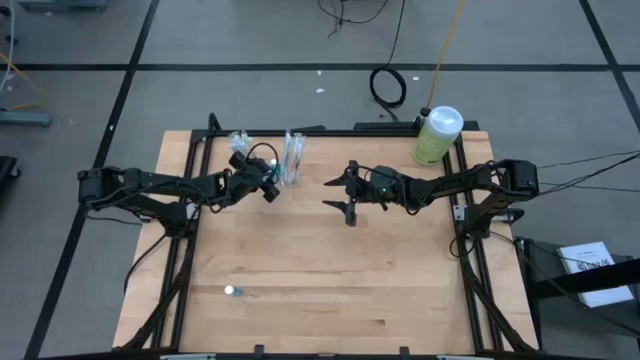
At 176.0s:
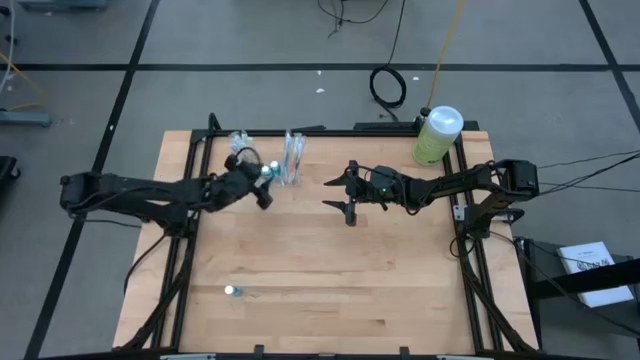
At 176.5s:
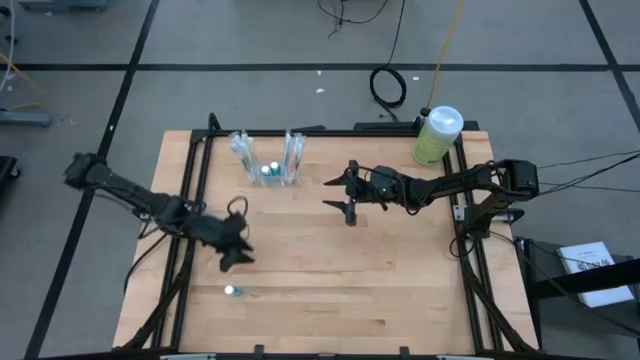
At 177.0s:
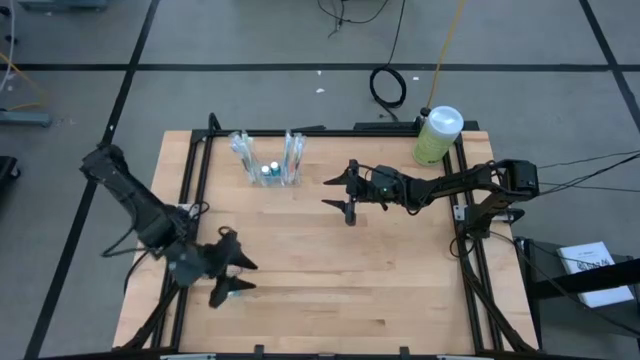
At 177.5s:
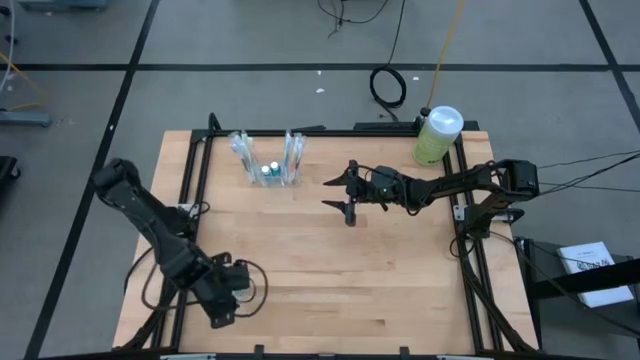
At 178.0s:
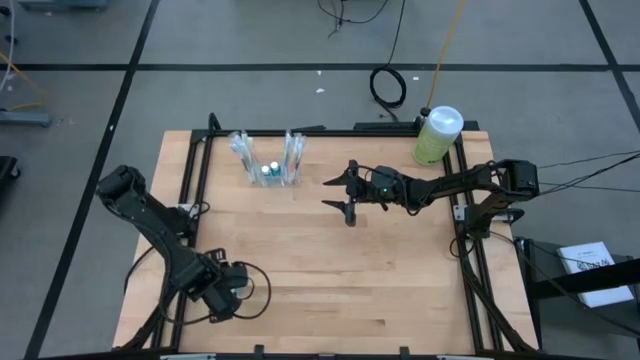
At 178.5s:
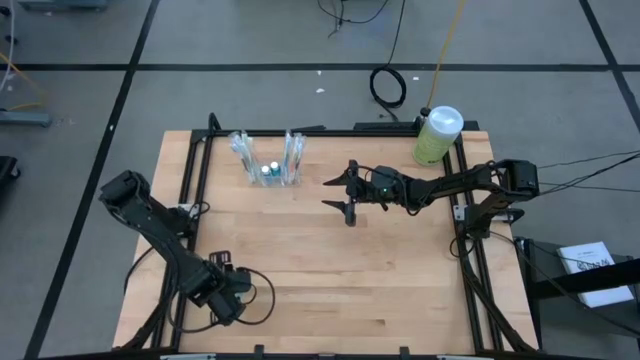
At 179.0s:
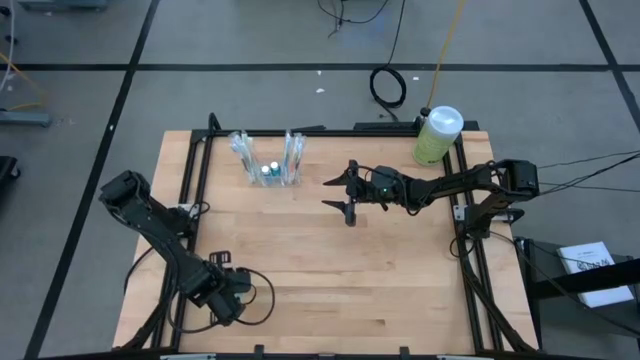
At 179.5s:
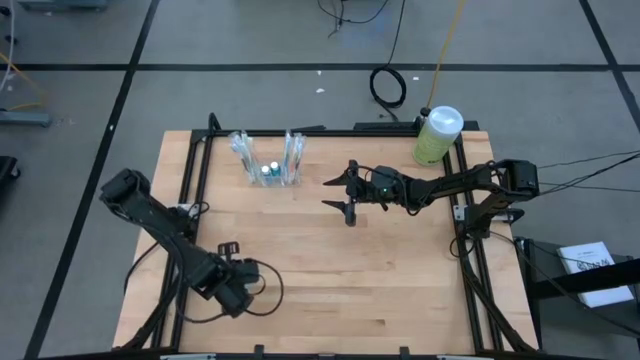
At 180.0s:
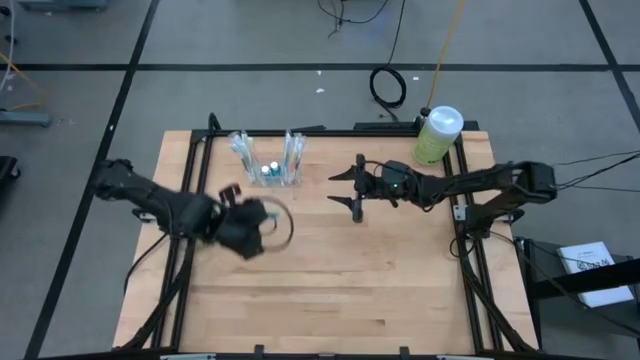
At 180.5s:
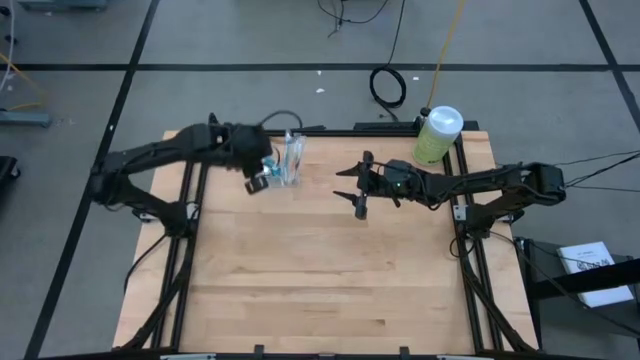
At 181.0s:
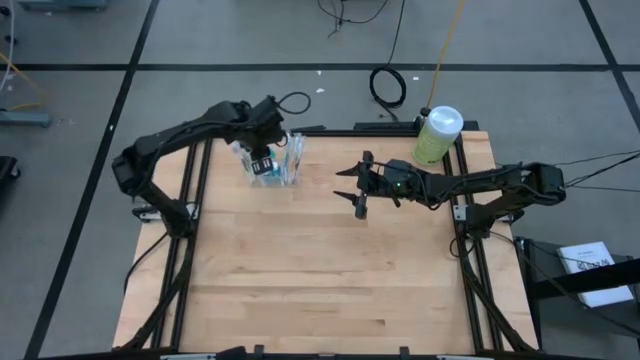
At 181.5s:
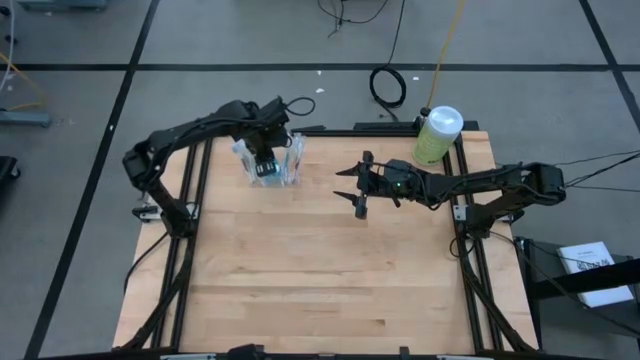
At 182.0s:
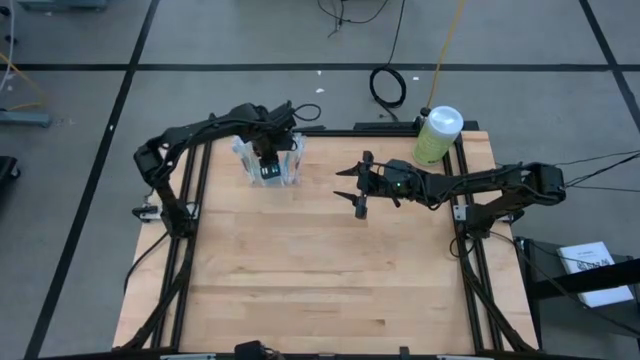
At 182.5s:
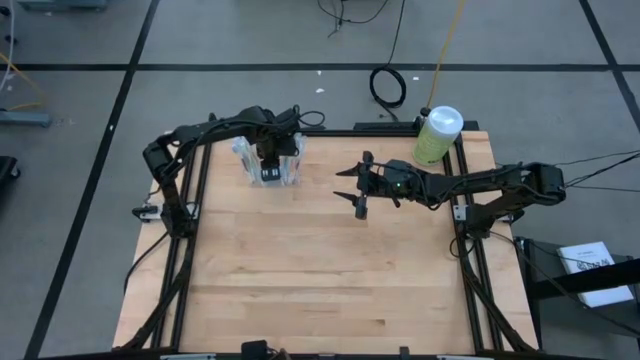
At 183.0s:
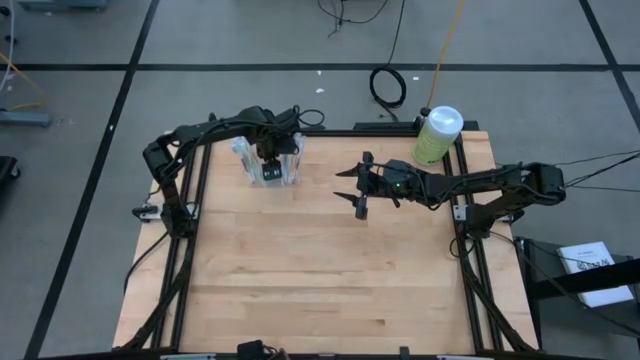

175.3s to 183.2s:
Task: Pick & Place toothbrushing station
Put the blue mouthwash into the transparent organizer

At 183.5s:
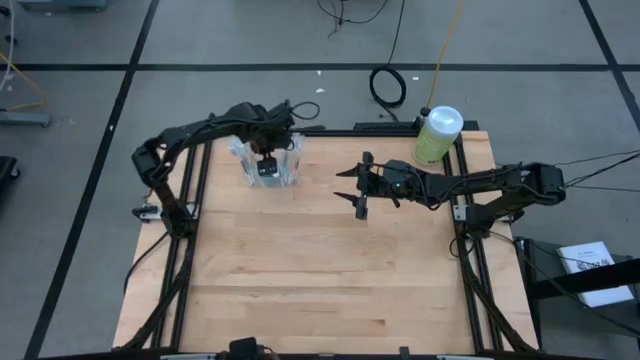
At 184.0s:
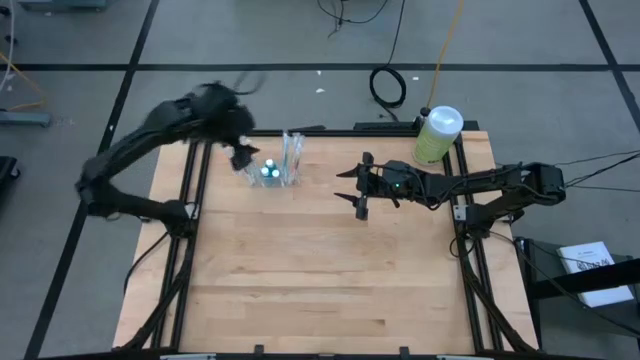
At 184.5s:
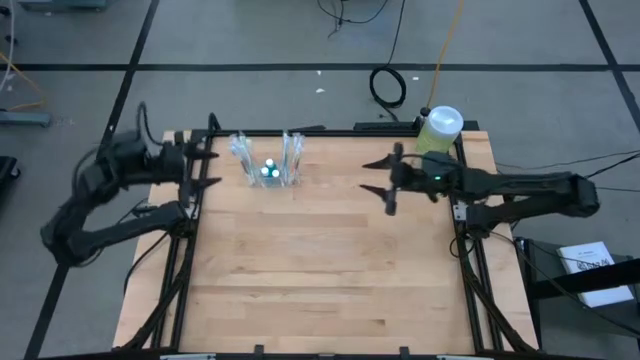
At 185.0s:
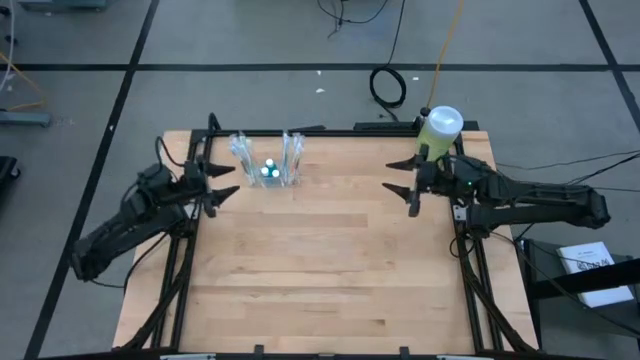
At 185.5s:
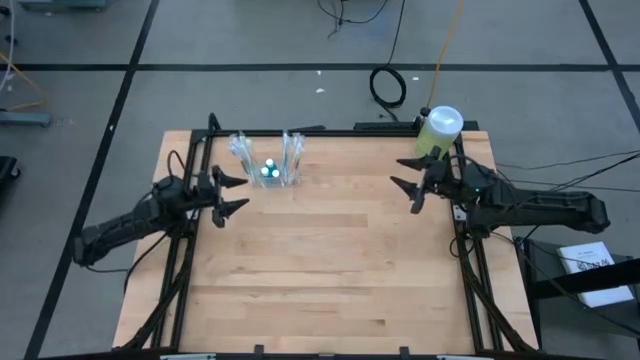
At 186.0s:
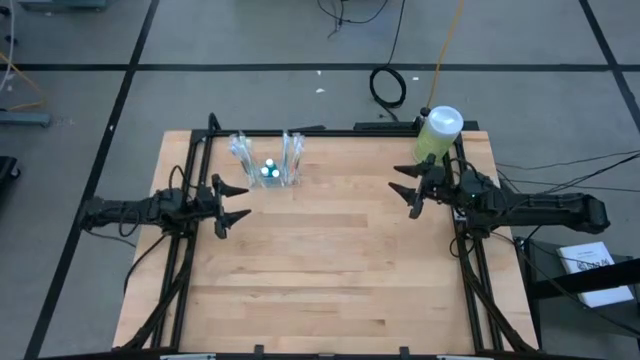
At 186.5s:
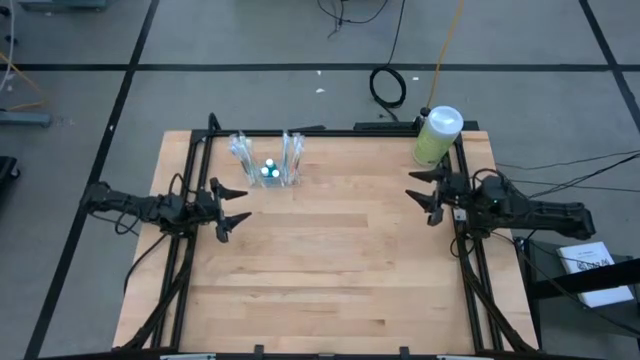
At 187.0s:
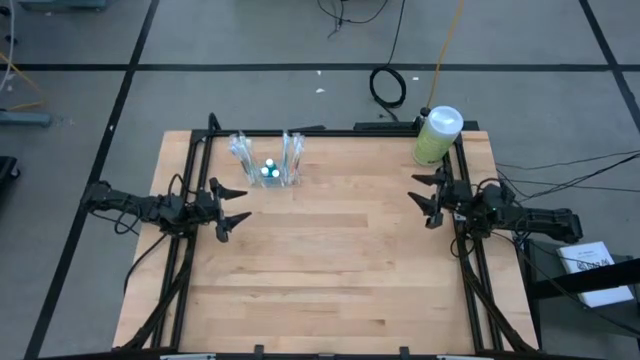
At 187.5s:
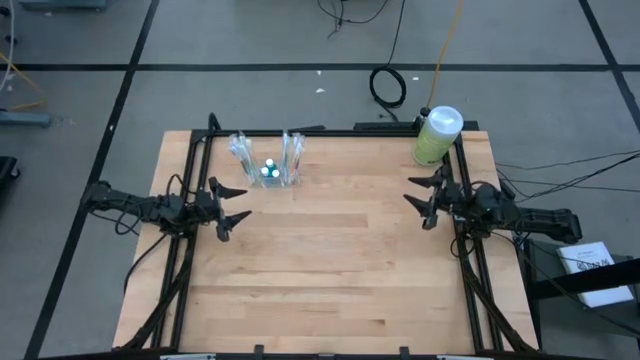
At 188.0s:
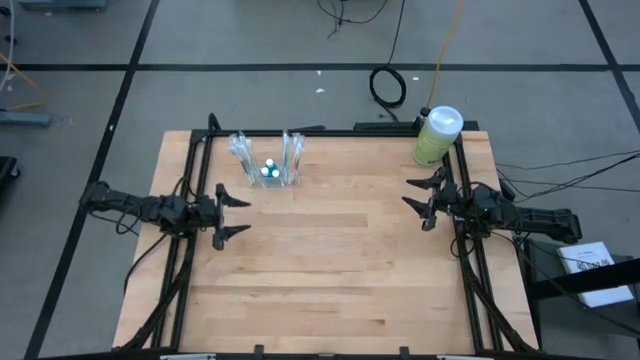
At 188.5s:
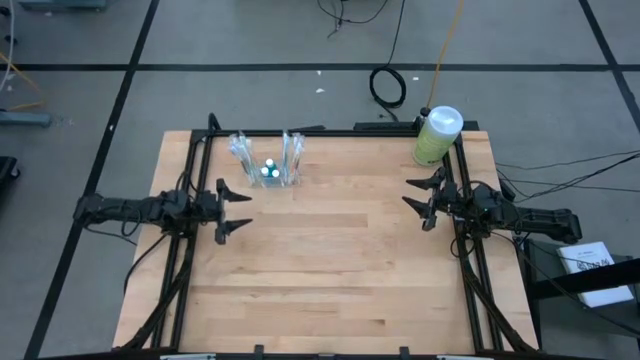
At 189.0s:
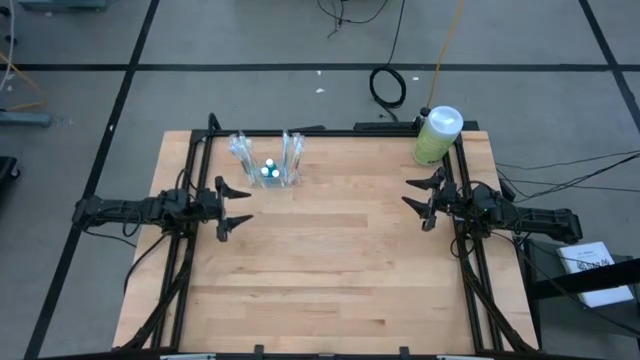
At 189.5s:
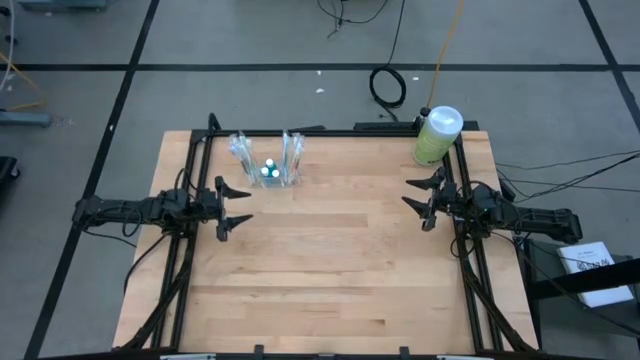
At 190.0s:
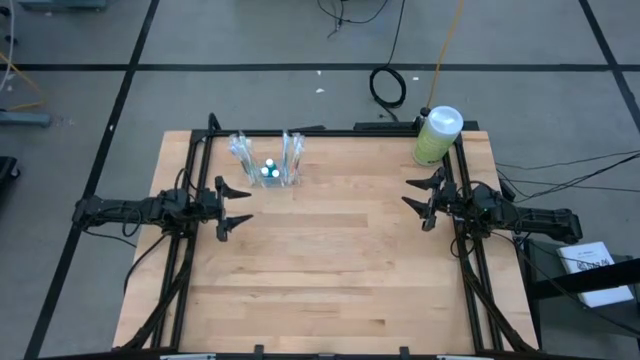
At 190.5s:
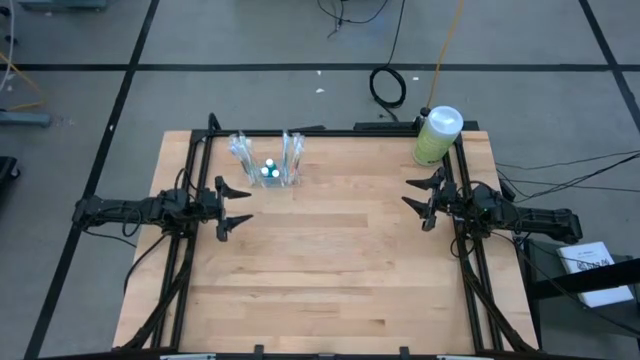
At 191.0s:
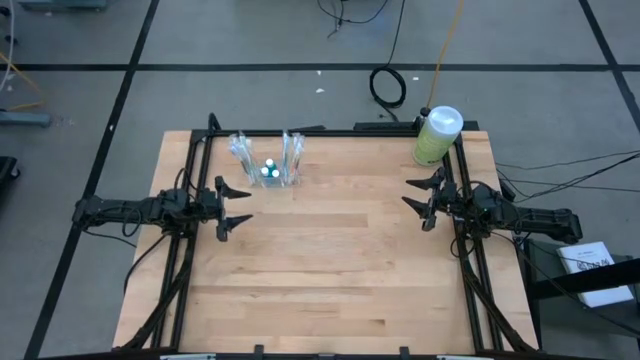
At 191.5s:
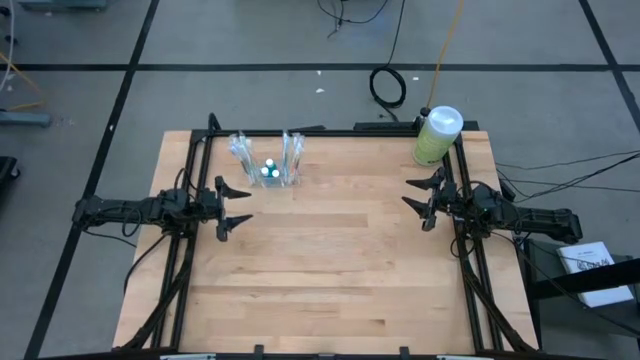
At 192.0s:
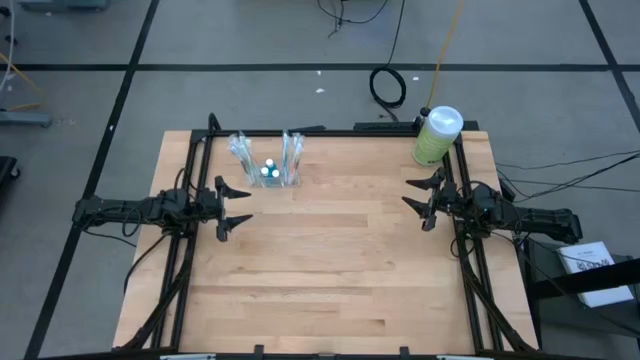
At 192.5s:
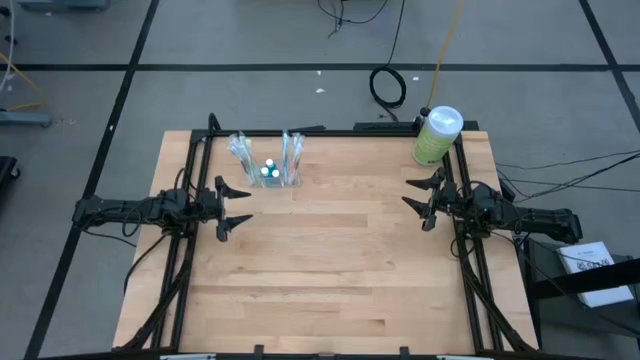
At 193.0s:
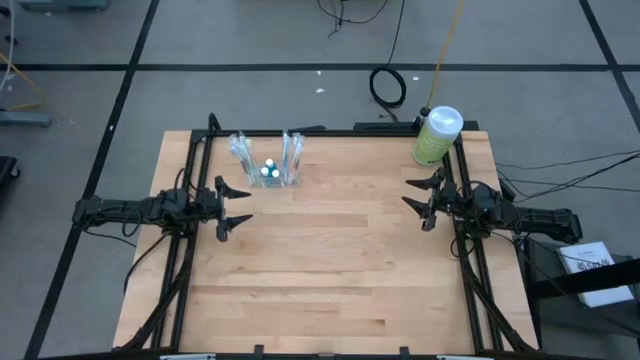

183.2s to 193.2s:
Return to Home Position

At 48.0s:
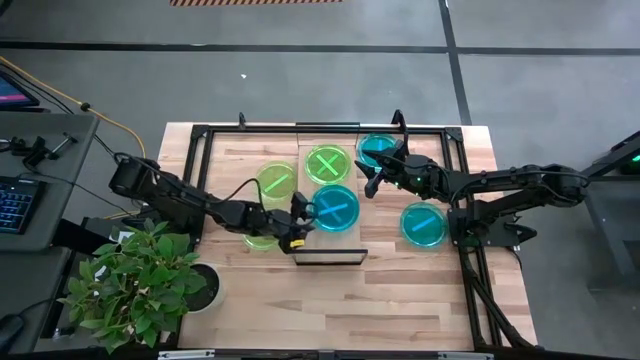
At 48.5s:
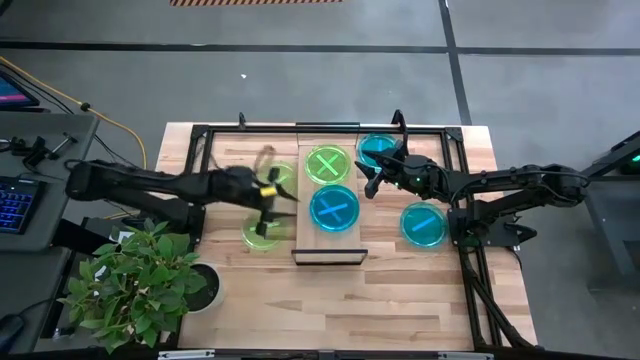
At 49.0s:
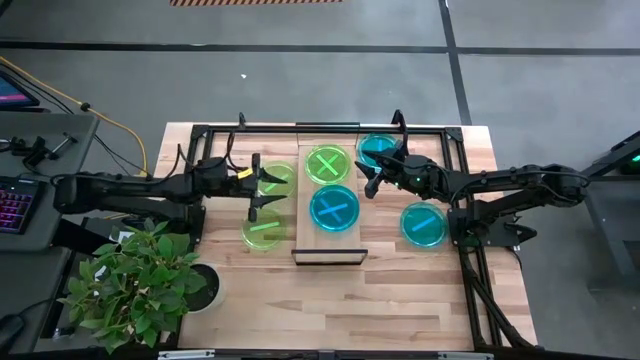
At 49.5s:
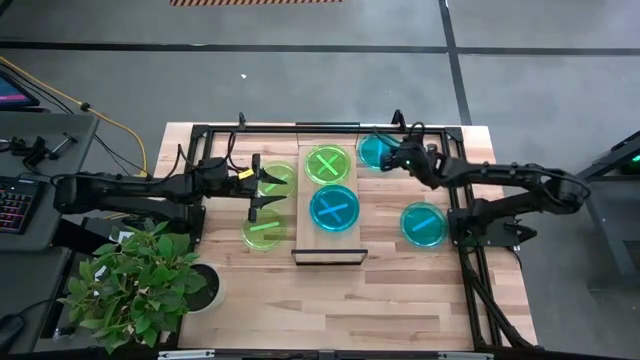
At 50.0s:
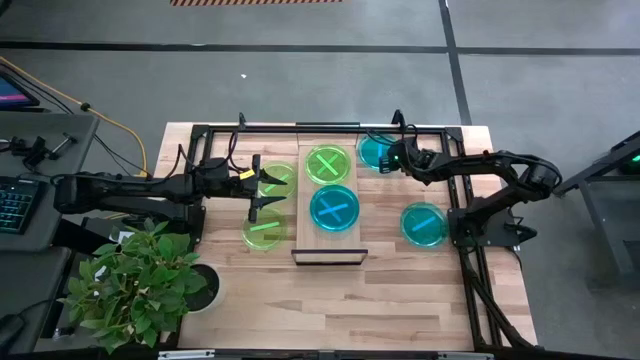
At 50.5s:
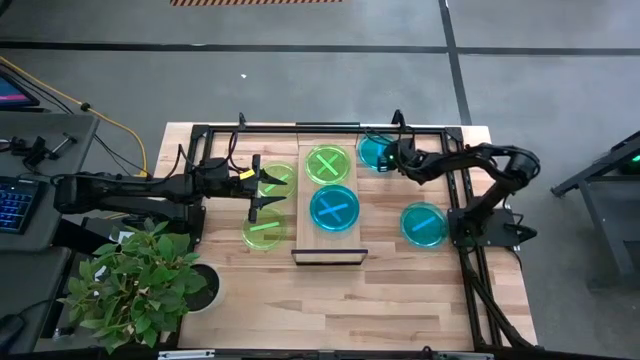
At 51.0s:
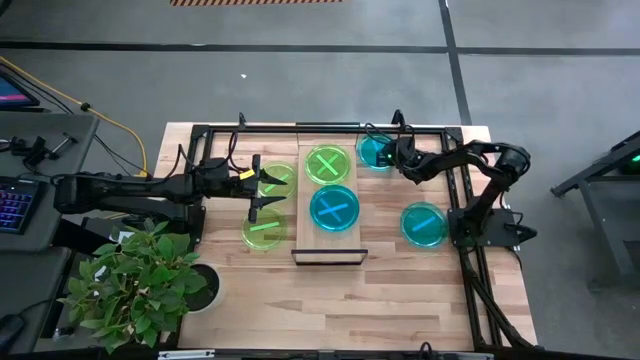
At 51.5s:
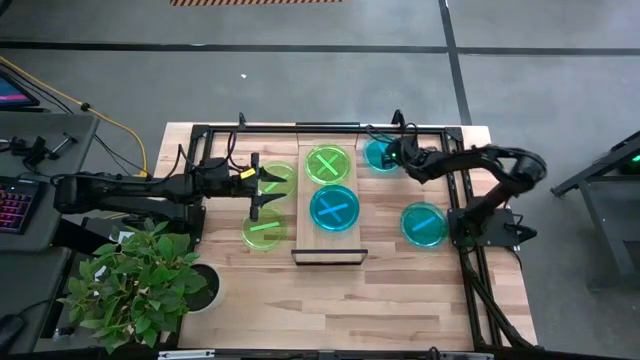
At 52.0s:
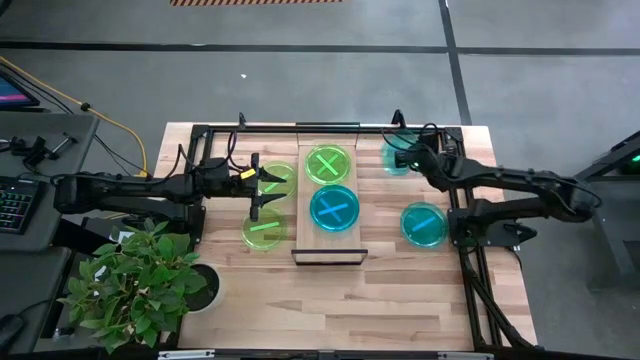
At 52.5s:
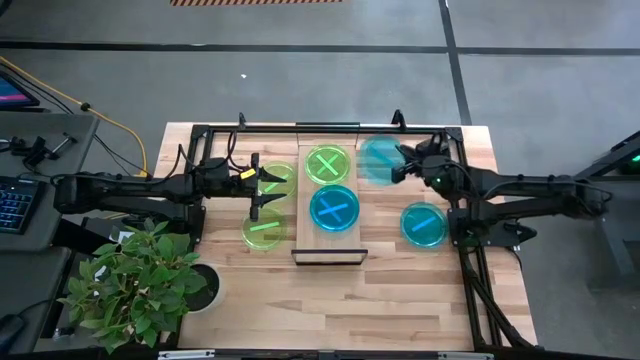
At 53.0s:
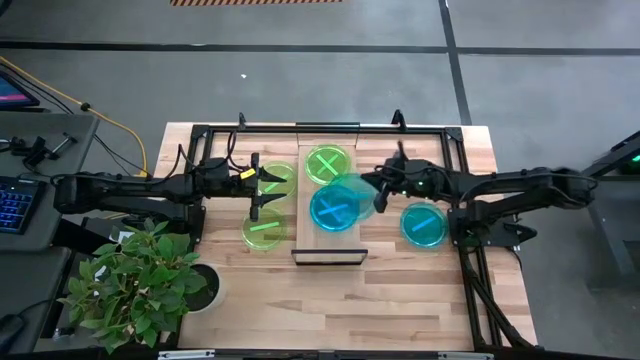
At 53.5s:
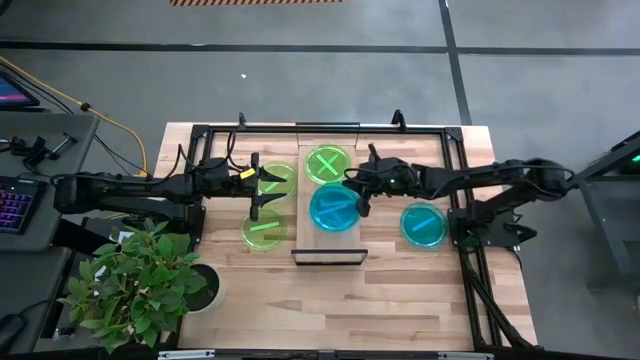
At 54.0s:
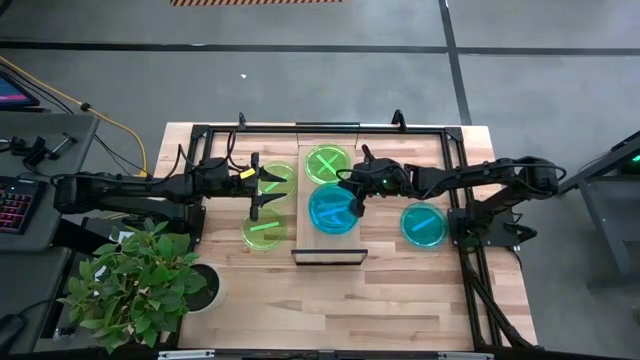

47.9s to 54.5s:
Task: Place and stack plates onto a shelf
Stack the top blue plate on top of the blue plates on the shelf
